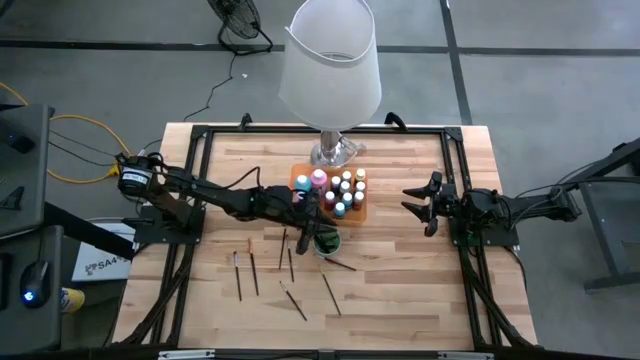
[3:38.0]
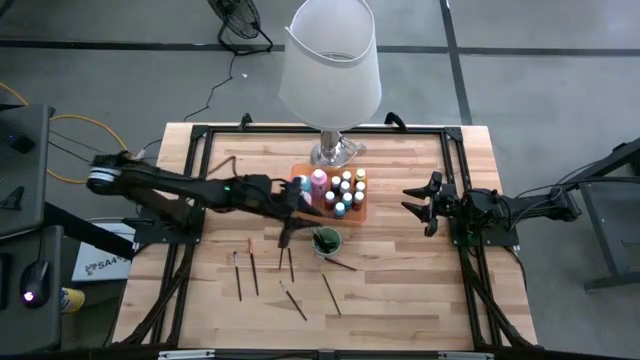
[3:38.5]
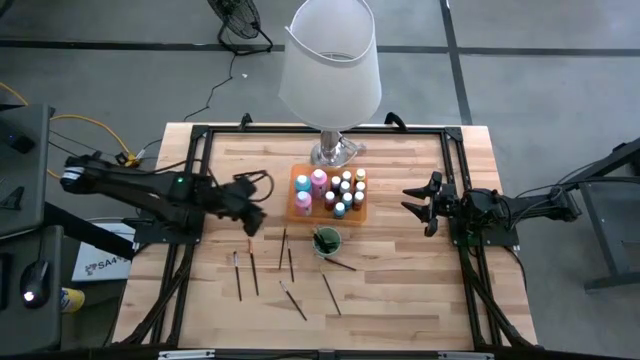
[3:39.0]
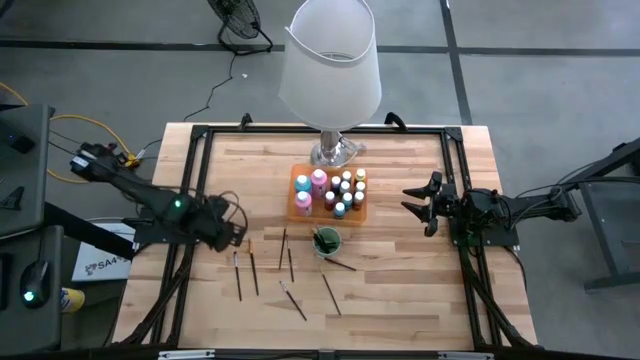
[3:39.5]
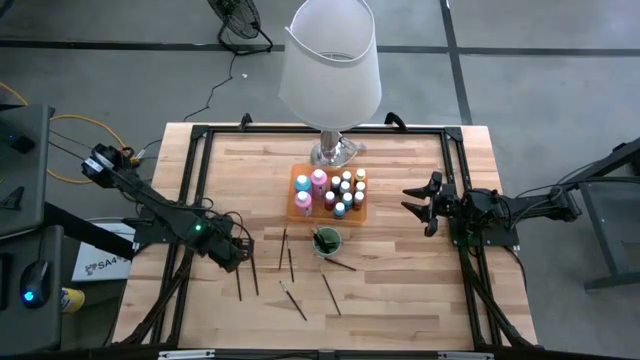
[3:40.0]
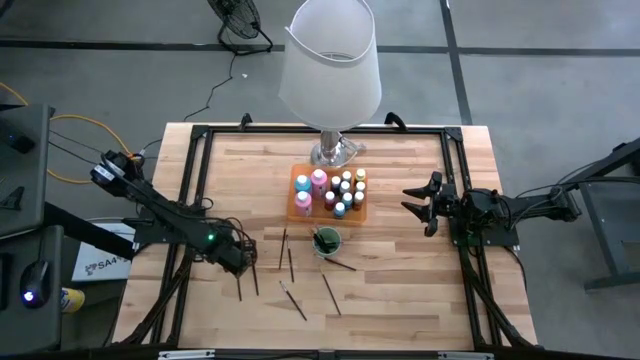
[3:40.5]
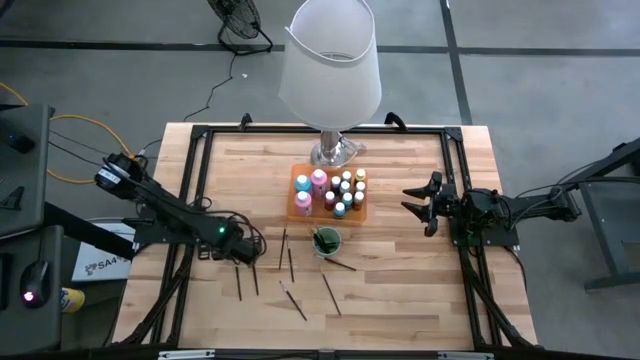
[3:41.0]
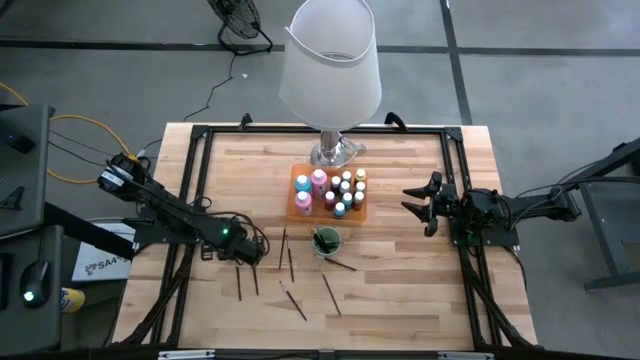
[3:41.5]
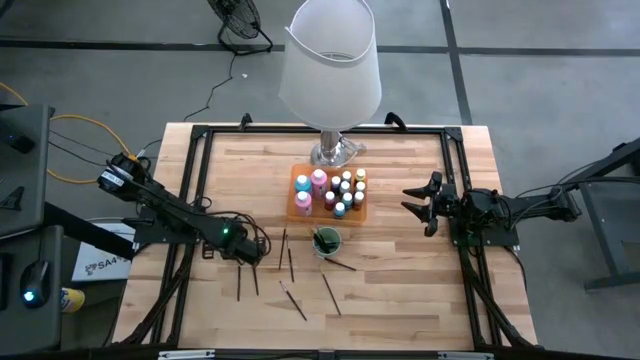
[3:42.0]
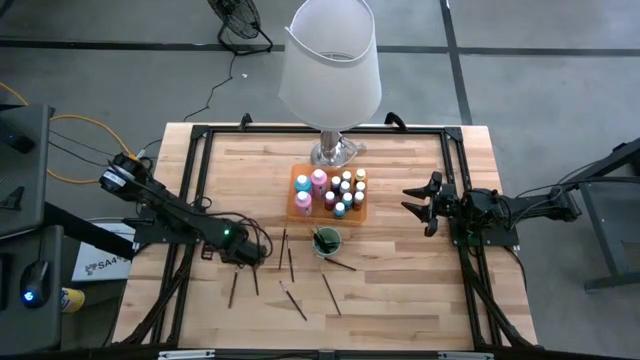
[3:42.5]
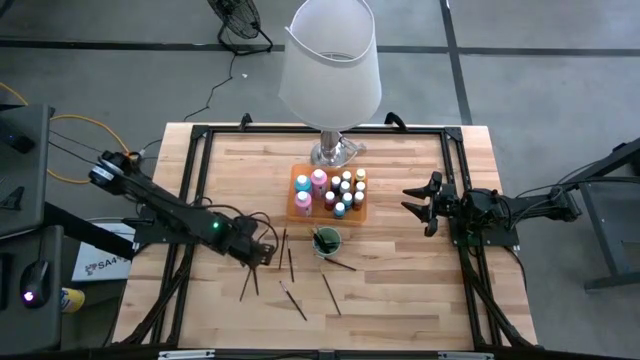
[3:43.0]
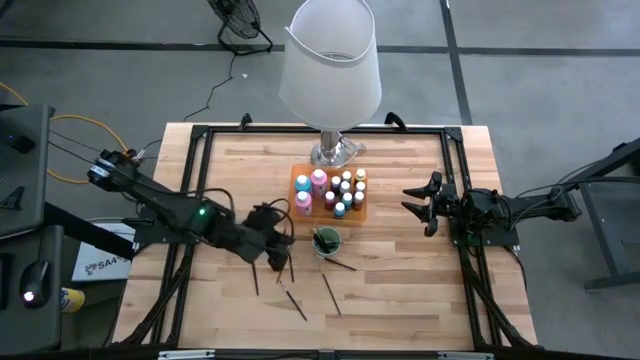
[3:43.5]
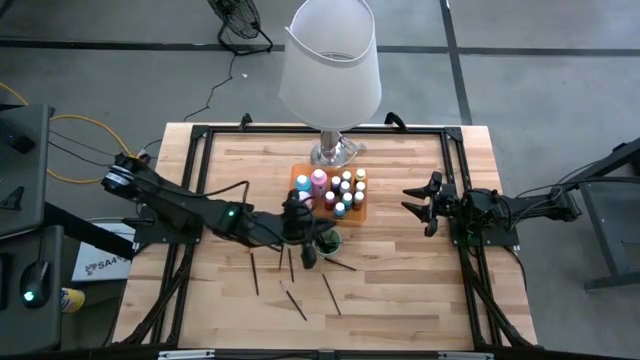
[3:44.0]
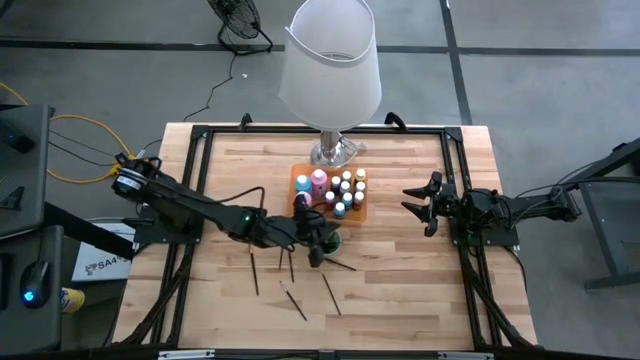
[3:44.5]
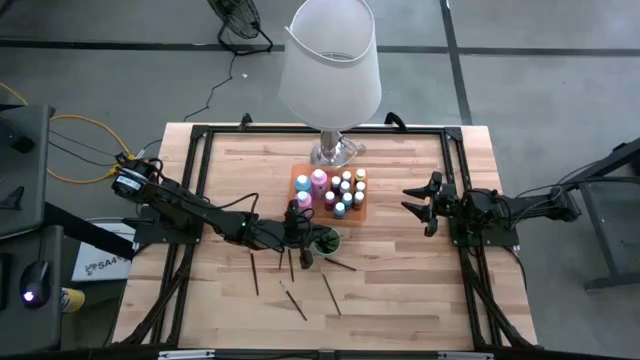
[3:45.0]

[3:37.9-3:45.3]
Task: Pick & Place Paint Supplies
Put the gray paintbrushes into the green cup

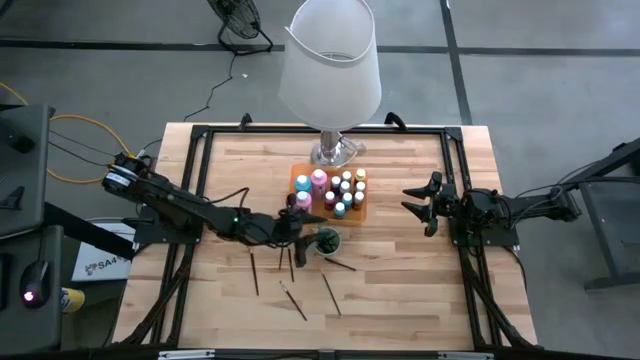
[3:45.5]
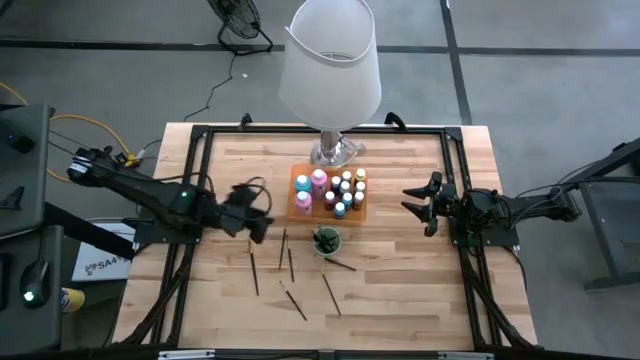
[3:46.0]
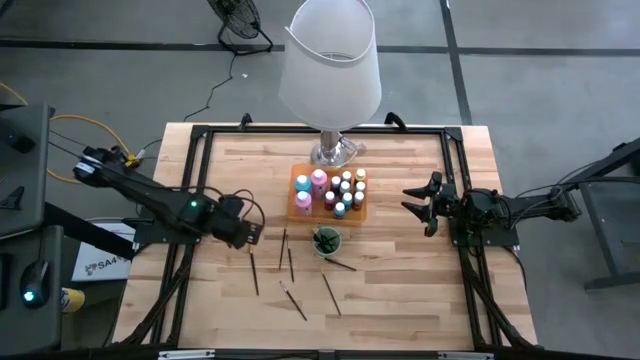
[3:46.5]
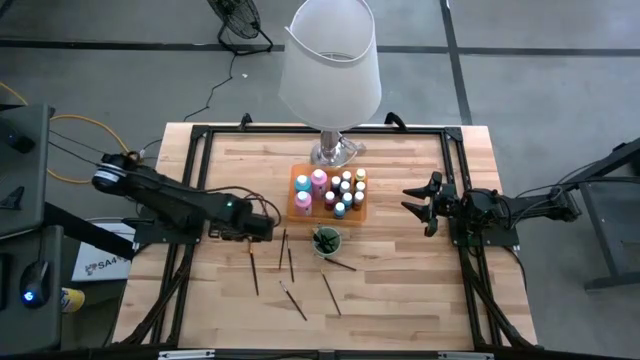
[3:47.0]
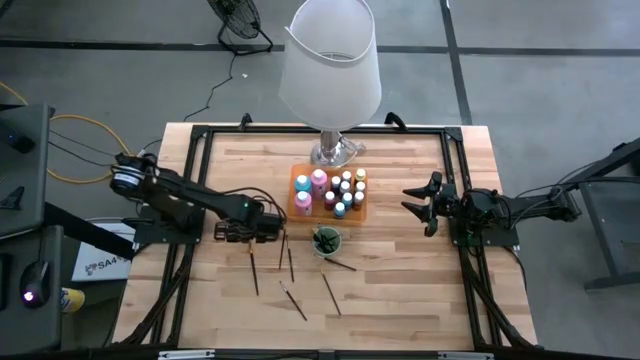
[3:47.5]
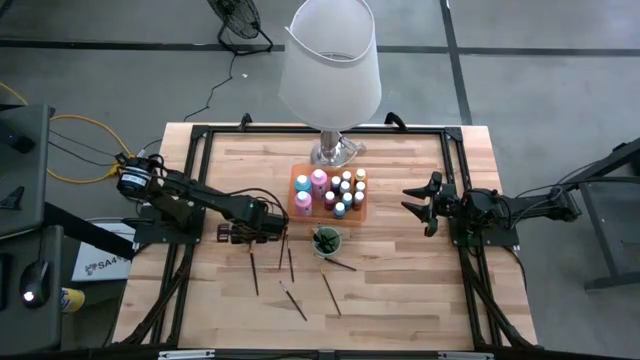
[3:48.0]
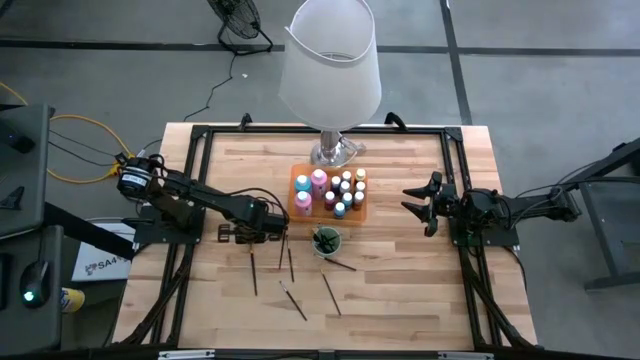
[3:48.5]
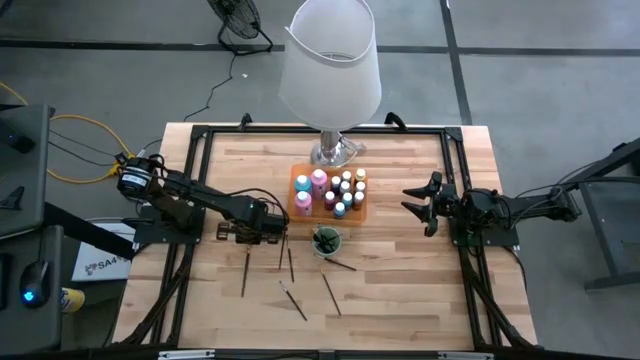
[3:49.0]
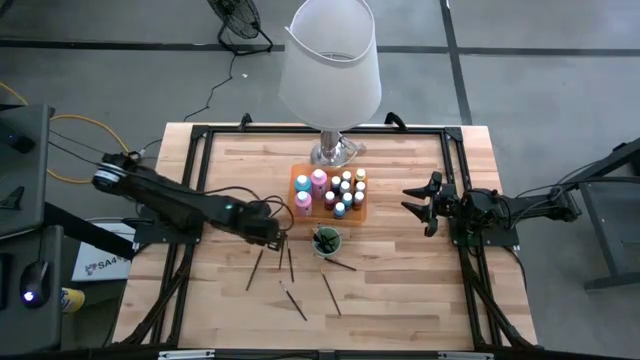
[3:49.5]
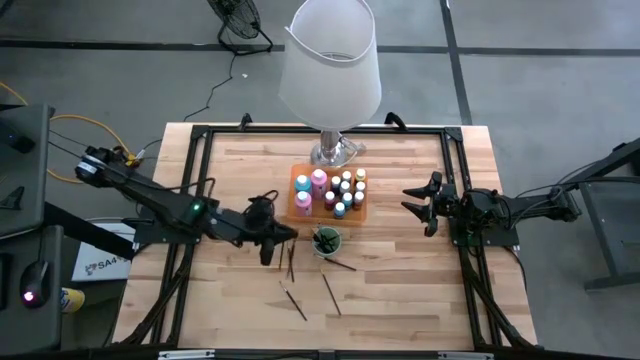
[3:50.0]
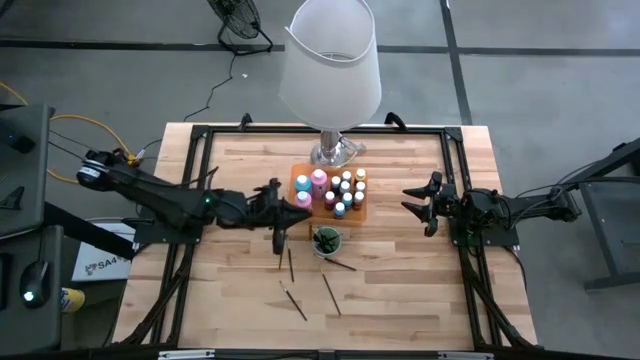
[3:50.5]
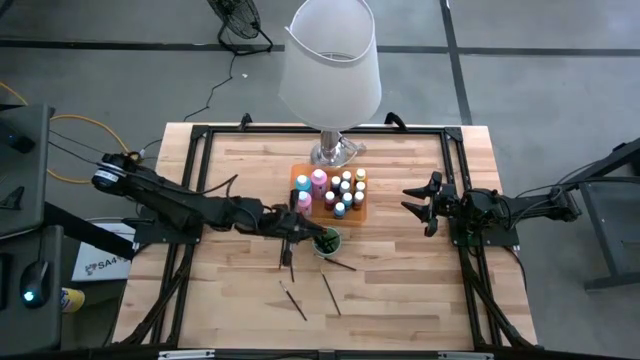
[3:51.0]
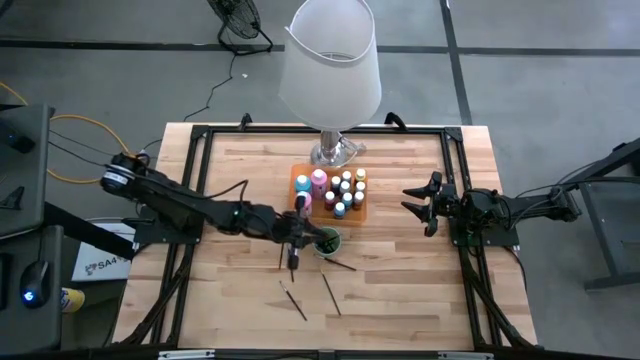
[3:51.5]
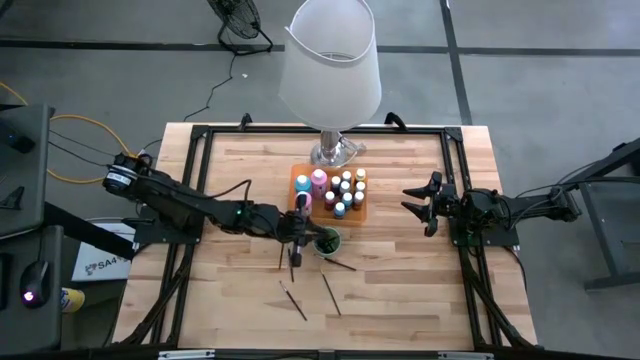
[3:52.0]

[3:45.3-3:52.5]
Put the orange paintbrushes into the green cup

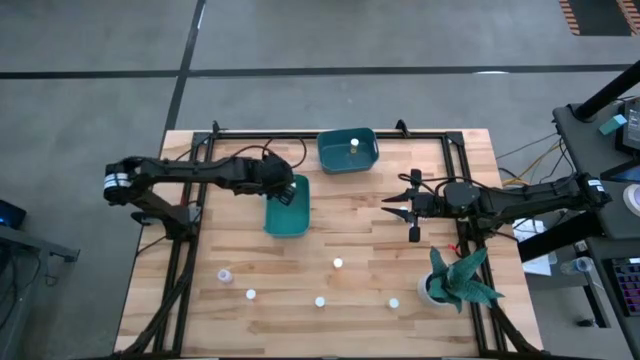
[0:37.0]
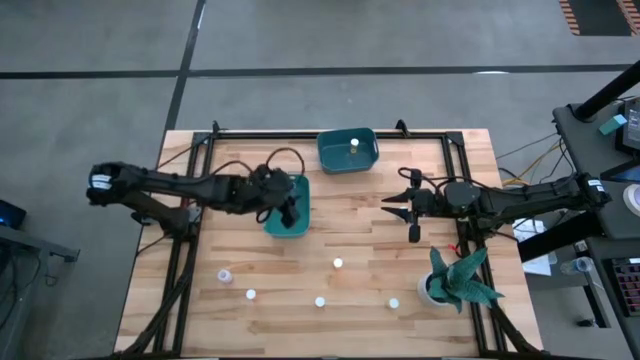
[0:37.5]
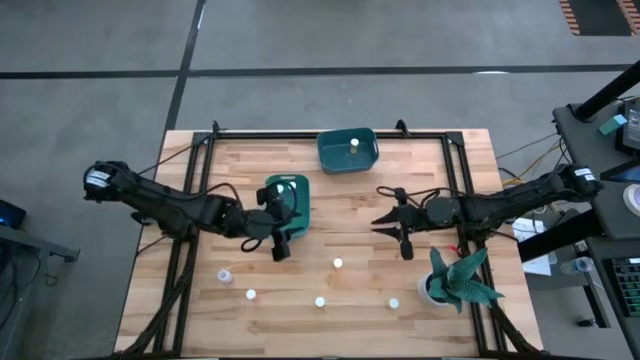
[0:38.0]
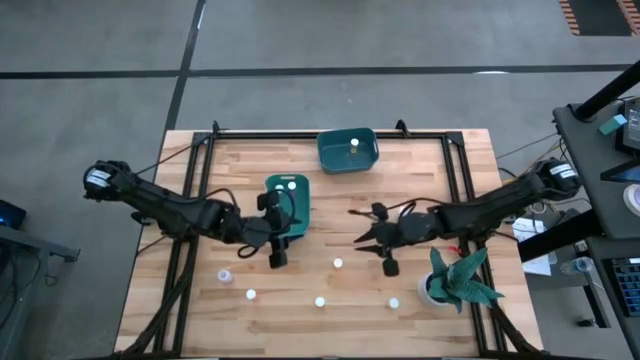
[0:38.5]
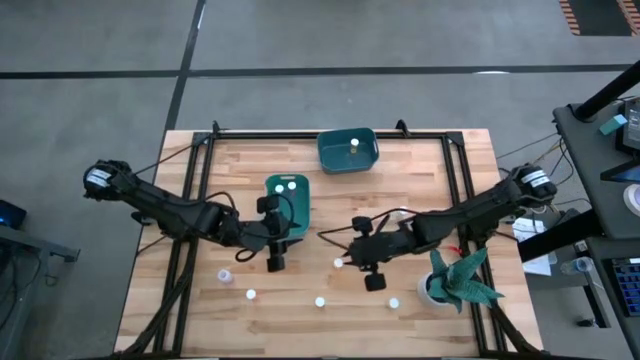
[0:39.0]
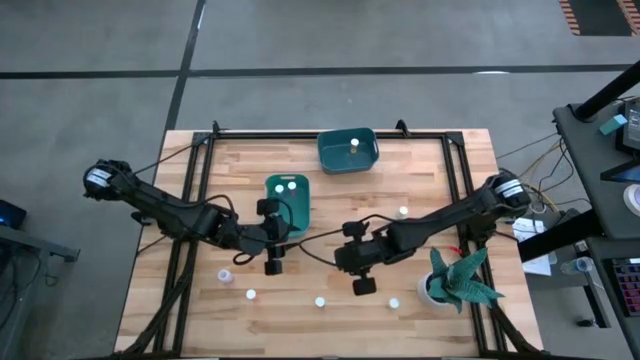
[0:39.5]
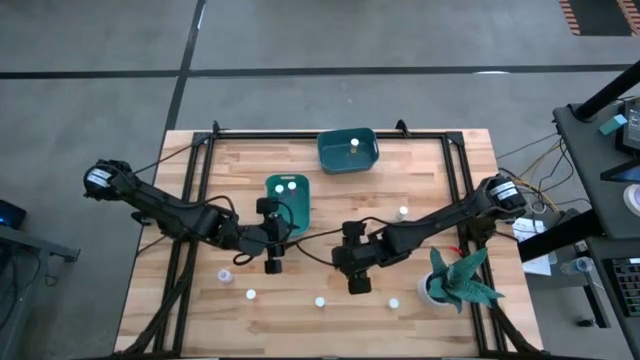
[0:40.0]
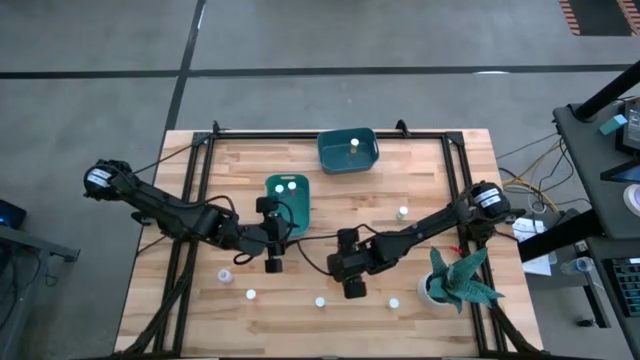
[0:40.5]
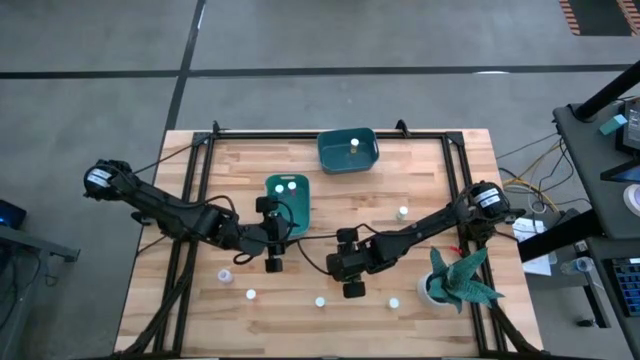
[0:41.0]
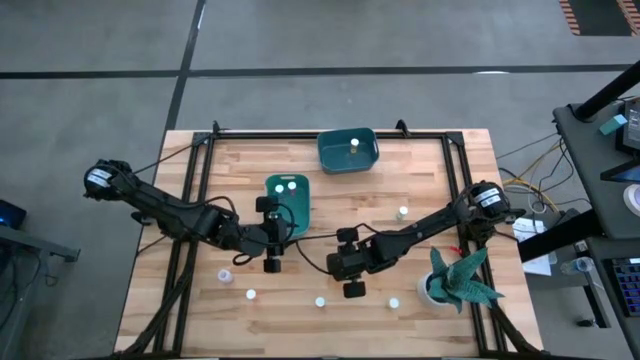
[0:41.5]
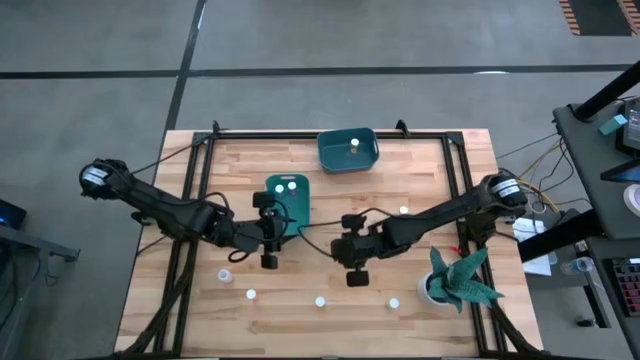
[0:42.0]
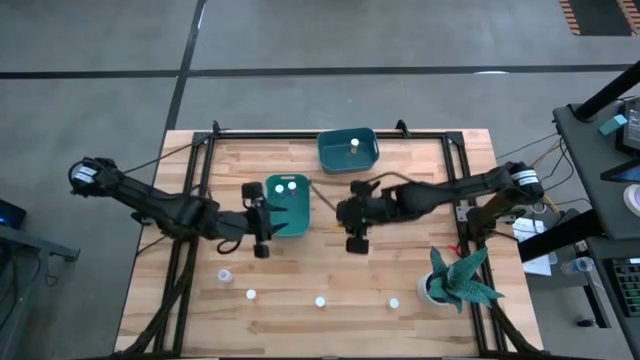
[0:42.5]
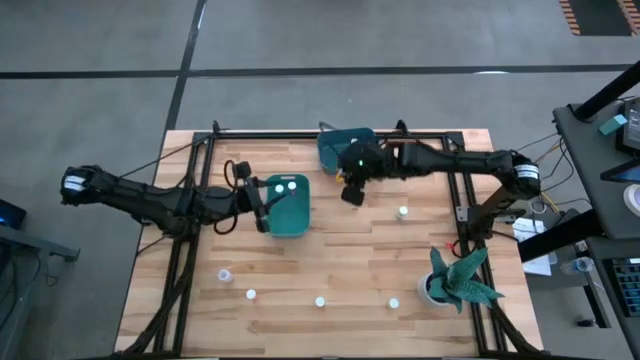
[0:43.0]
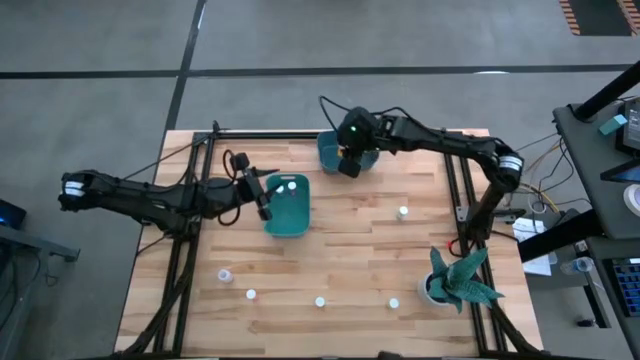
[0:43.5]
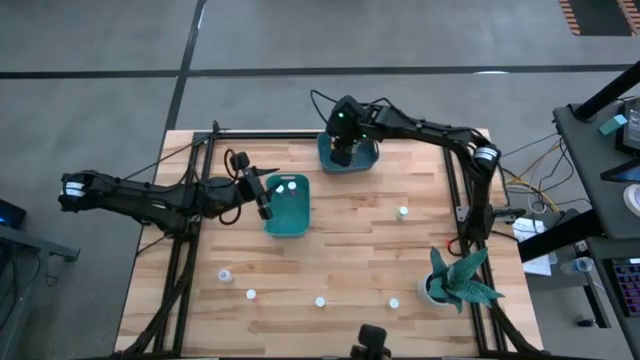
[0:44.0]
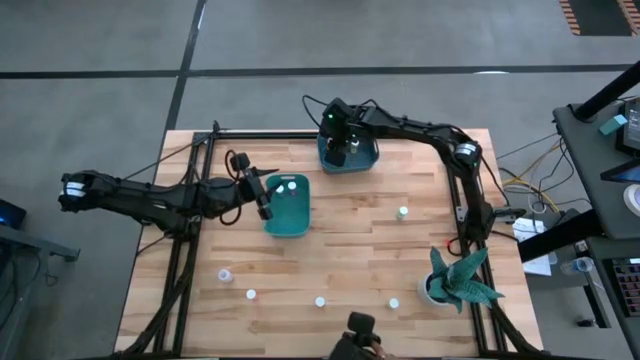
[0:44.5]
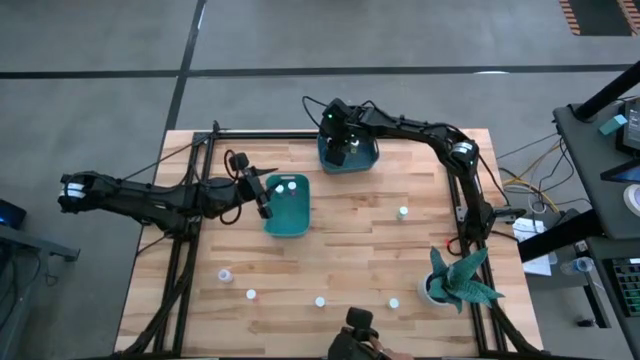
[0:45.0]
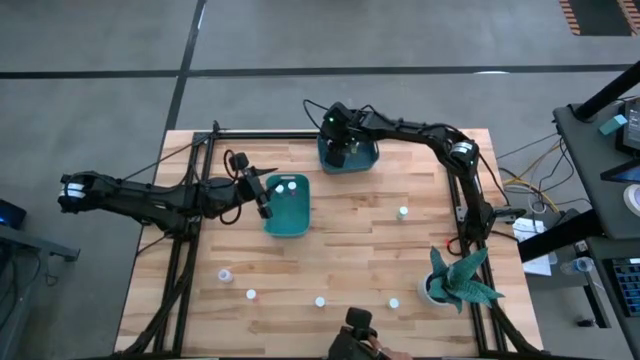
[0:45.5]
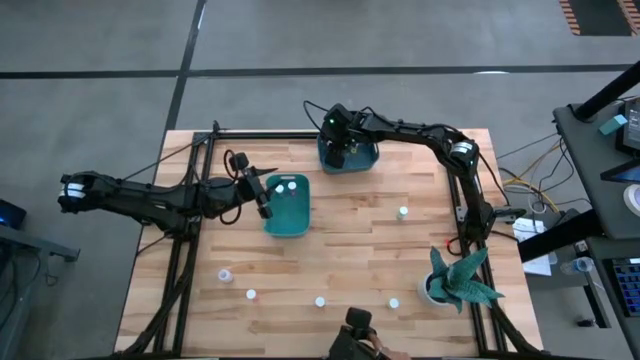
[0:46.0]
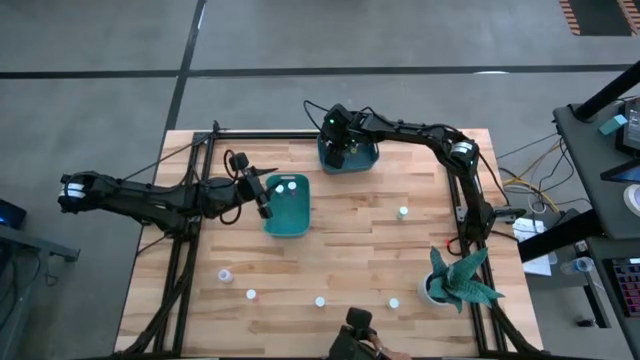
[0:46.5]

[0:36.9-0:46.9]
Task: Pick and place medicine bottles into bin by pill shape (circle, oval)
Put the orange tablet pill bottle into the blue bin
